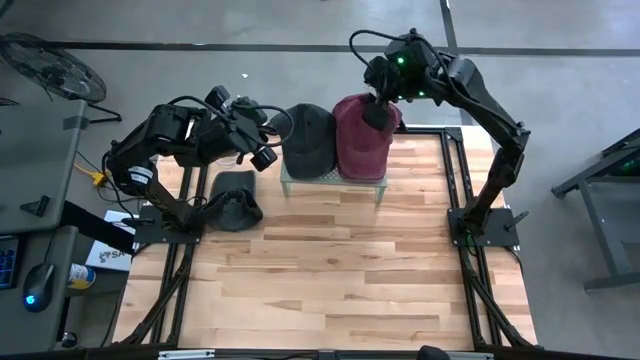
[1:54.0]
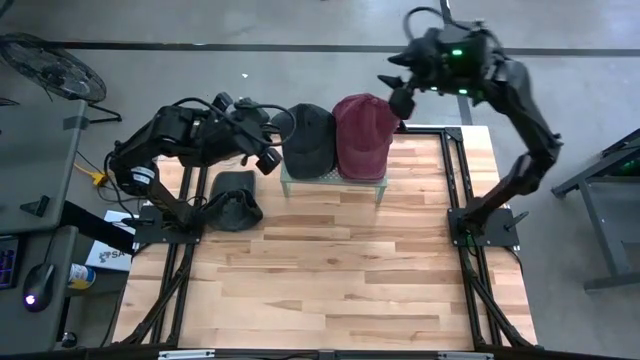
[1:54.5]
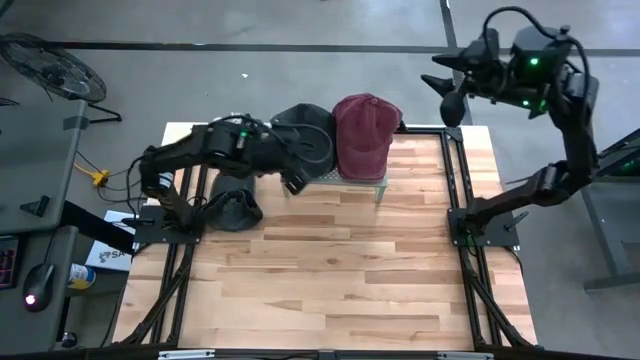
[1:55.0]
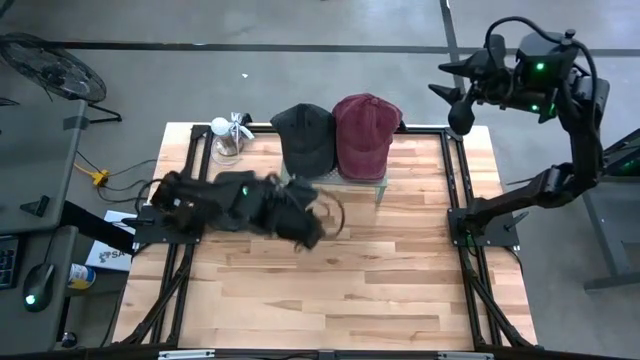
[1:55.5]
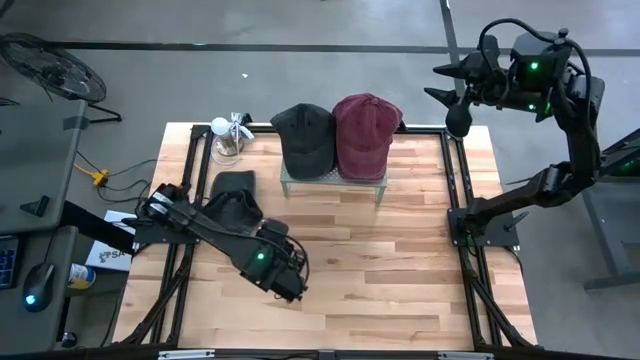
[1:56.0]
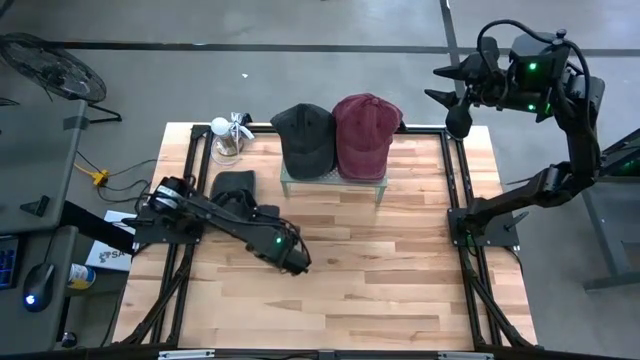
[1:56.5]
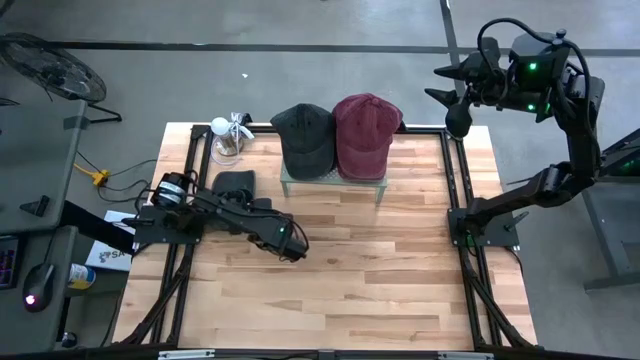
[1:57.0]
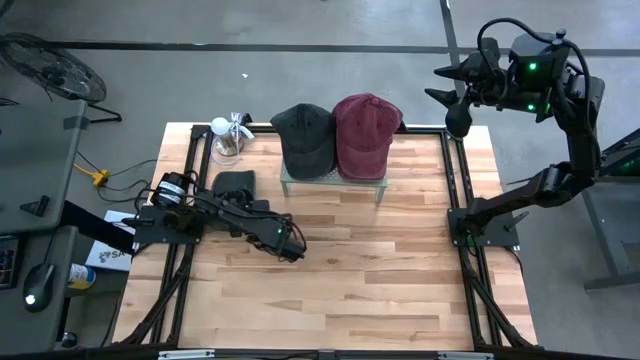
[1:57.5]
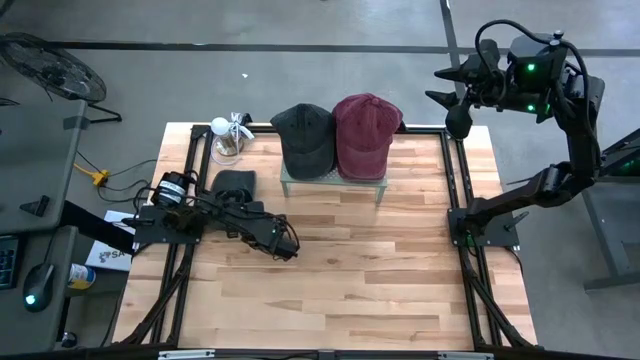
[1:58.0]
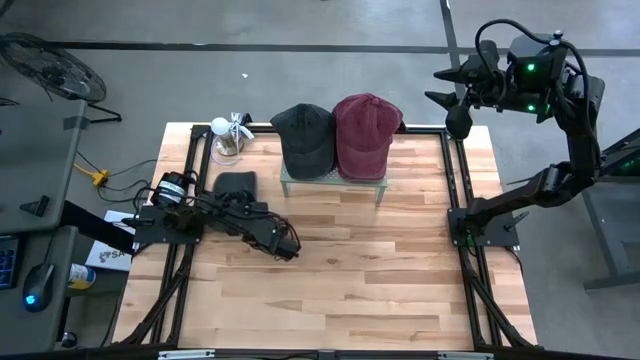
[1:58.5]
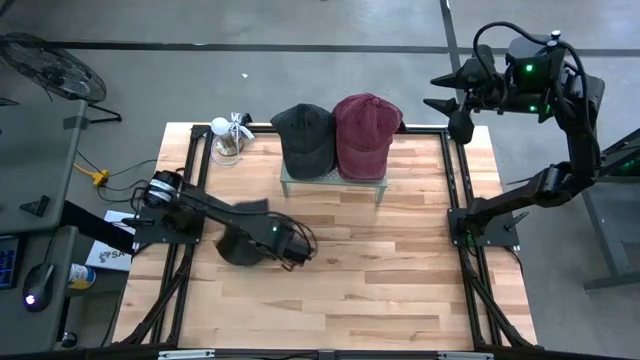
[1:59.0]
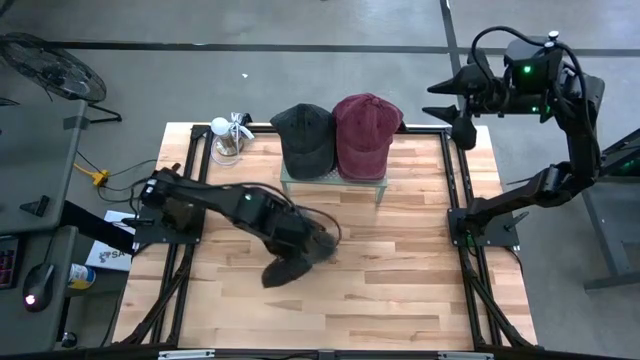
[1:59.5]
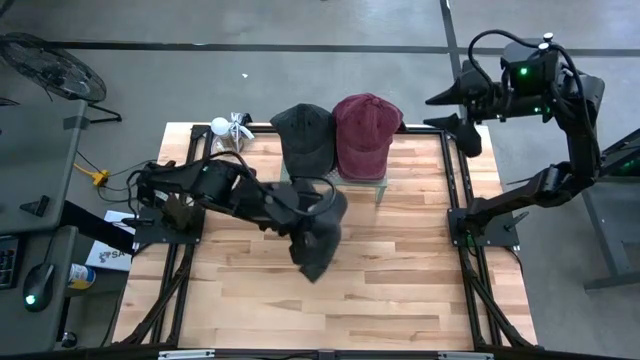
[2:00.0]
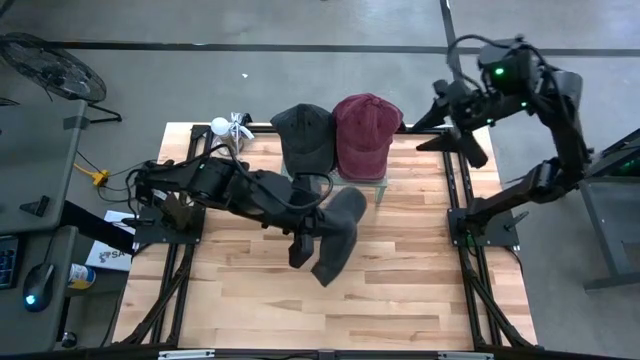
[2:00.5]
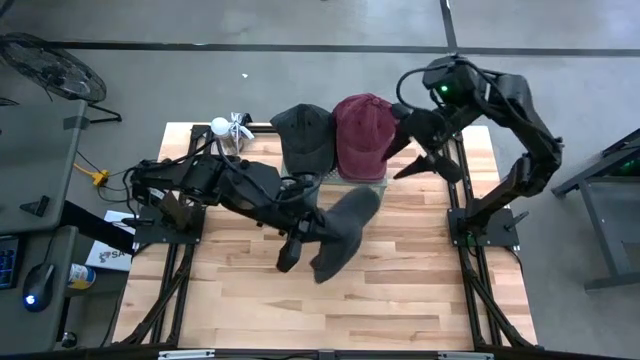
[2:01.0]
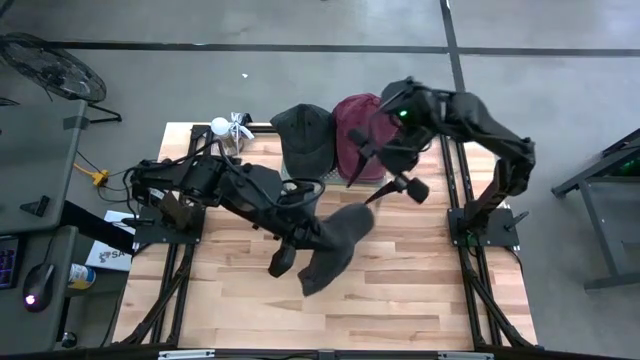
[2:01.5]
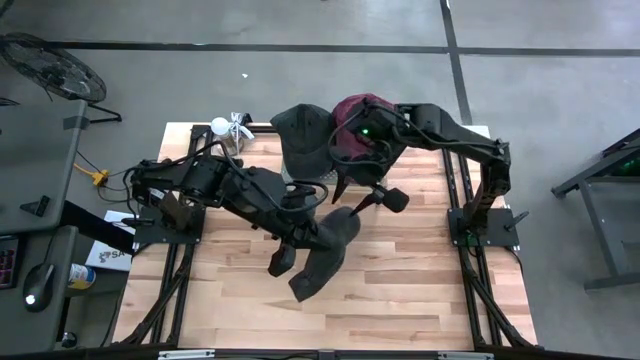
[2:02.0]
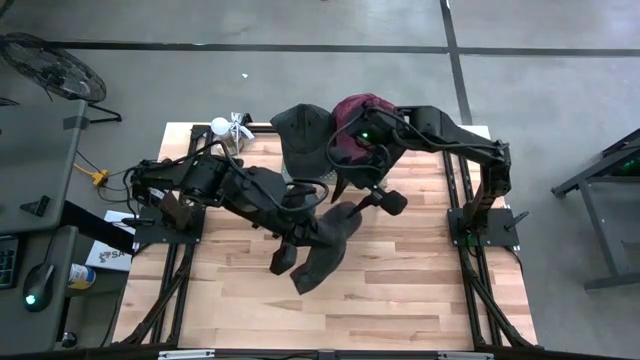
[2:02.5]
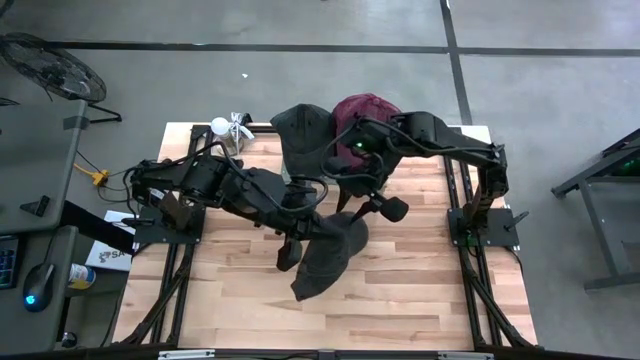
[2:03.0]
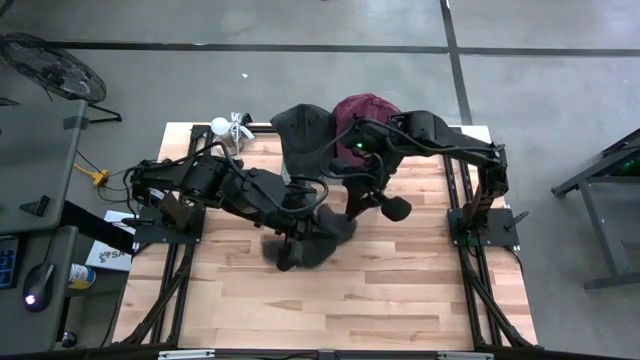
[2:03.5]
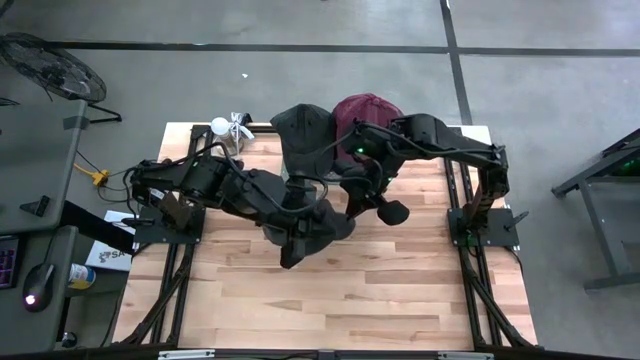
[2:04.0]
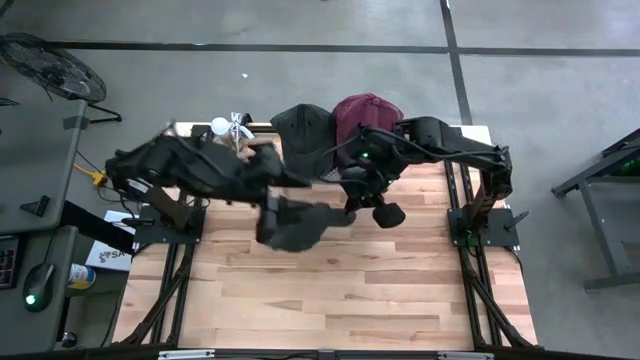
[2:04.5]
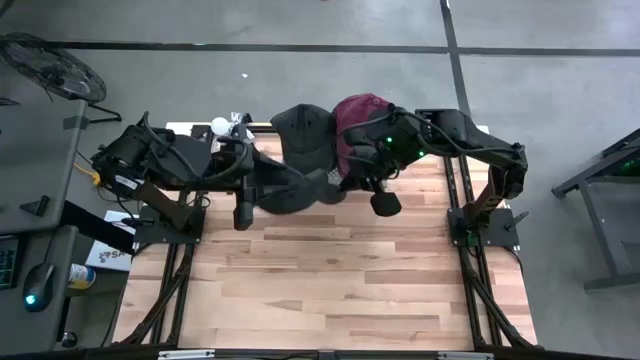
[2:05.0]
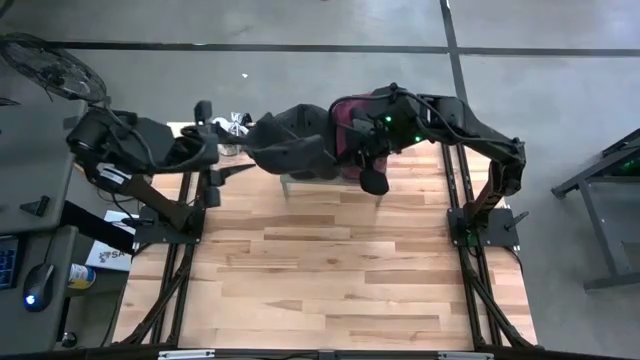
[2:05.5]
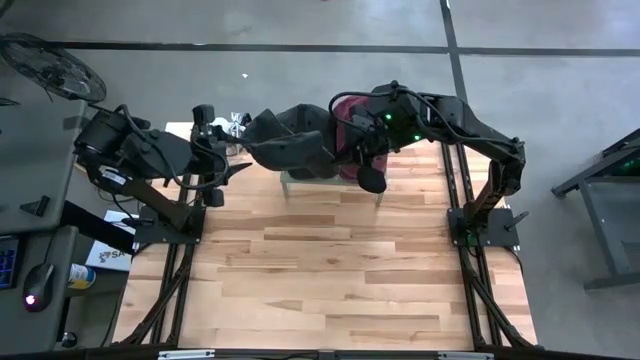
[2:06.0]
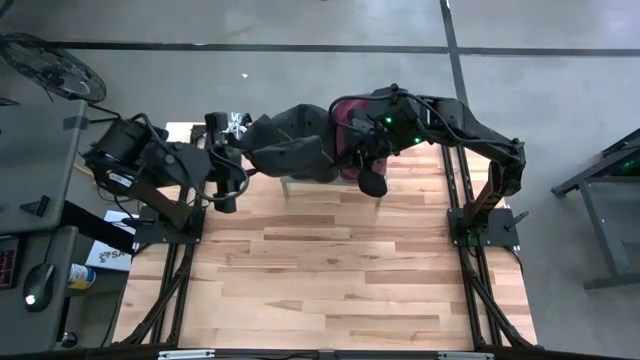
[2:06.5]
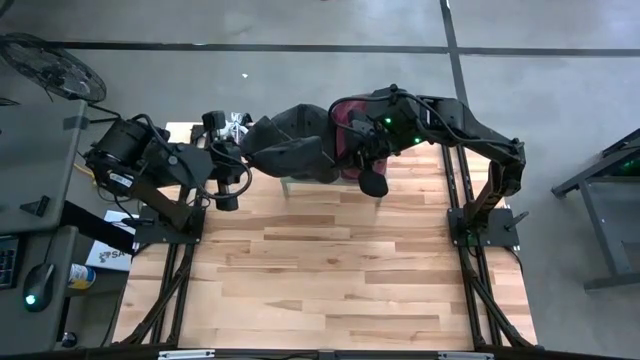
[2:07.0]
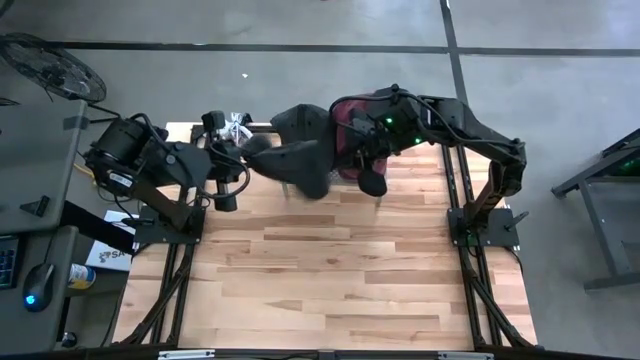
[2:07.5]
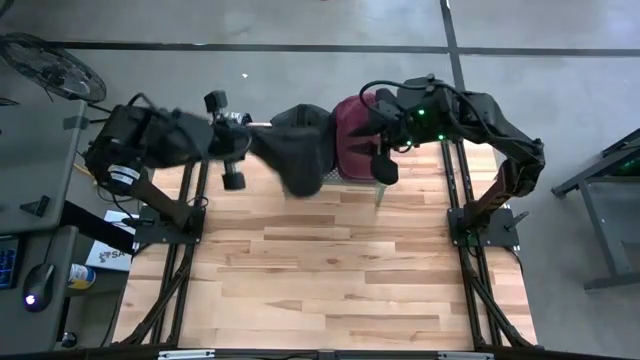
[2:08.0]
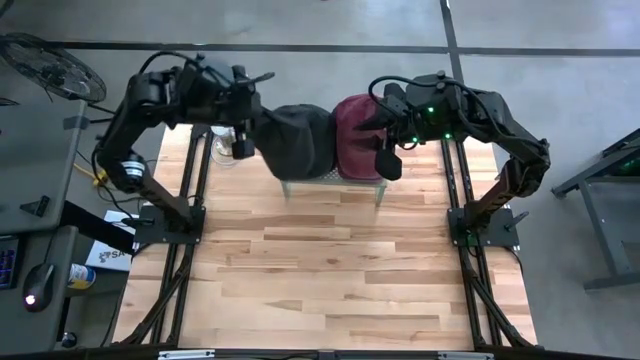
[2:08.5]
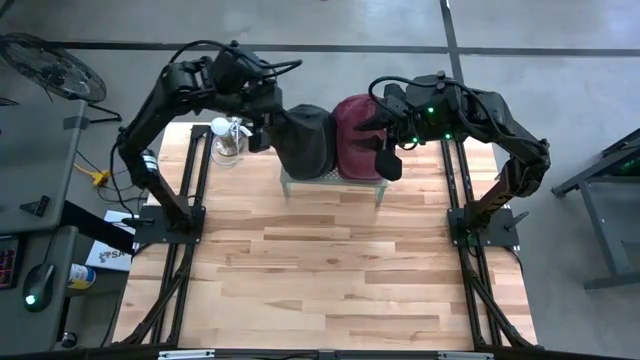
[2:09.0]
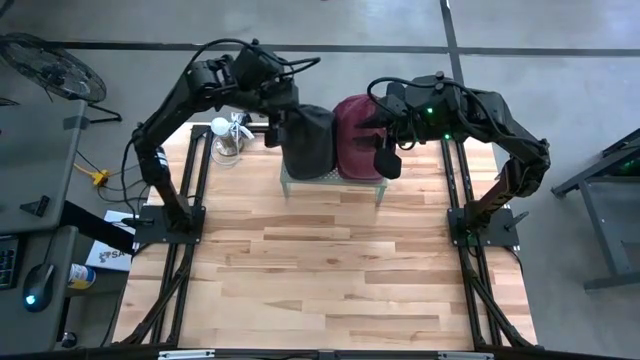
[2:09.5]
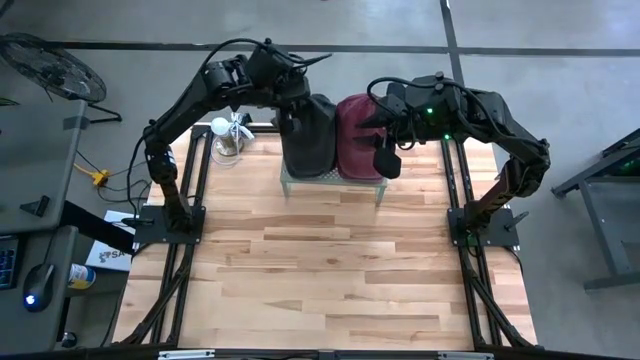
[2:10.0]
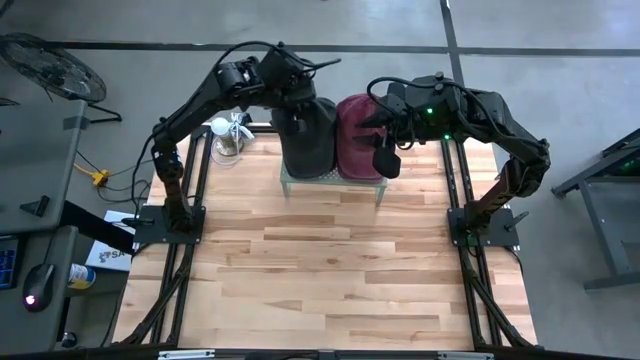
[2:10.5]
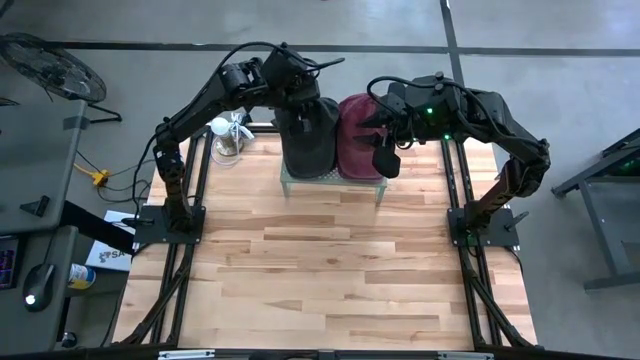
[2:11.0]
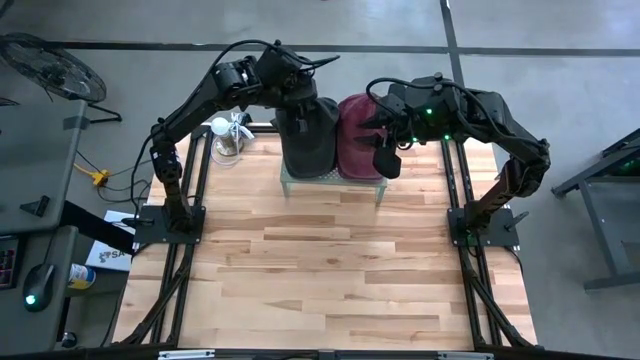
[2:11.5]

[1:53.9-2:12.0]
Task: Pick & Place hat
Stack the black cap on the other black caps on the shelf

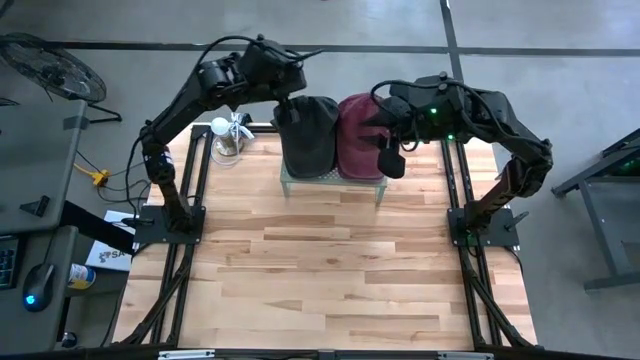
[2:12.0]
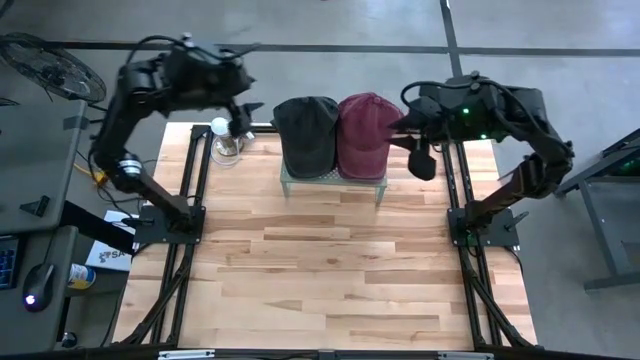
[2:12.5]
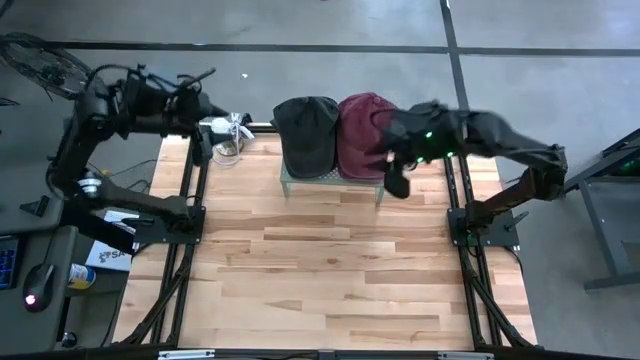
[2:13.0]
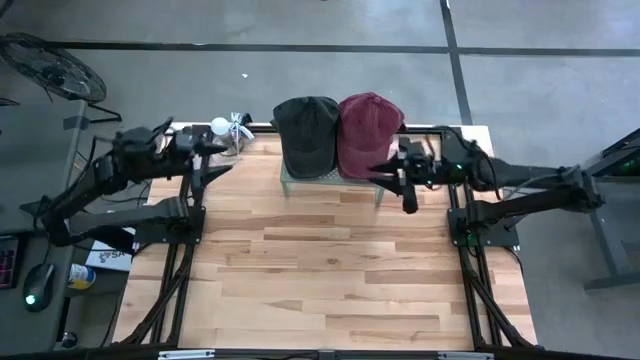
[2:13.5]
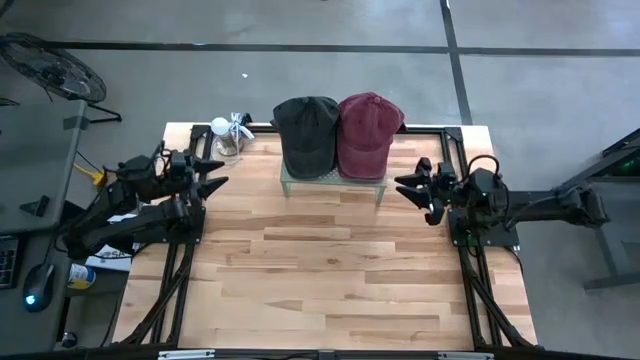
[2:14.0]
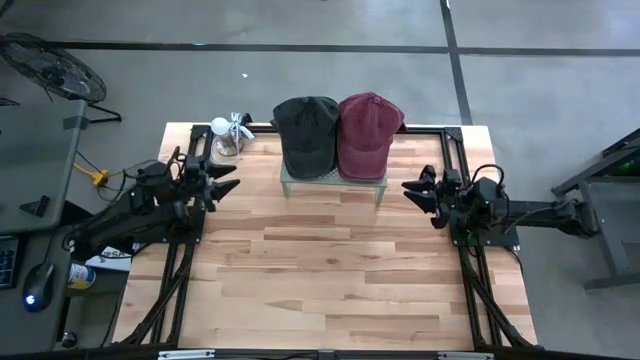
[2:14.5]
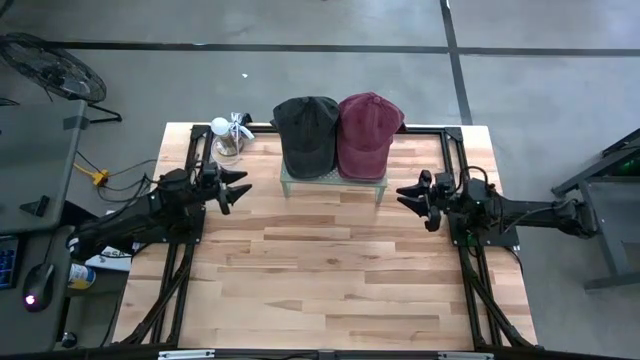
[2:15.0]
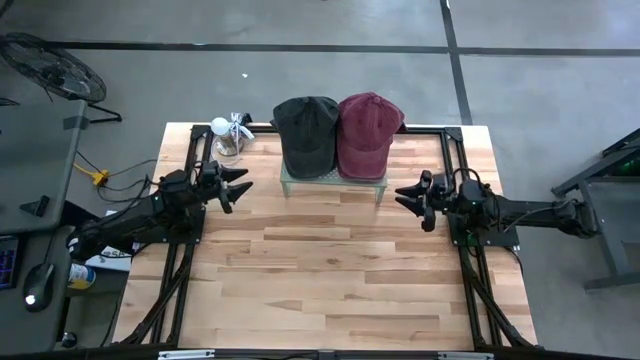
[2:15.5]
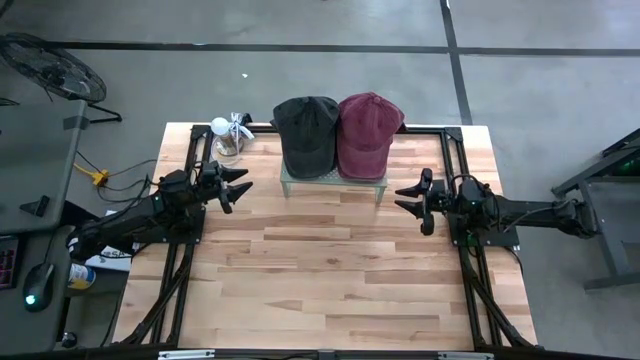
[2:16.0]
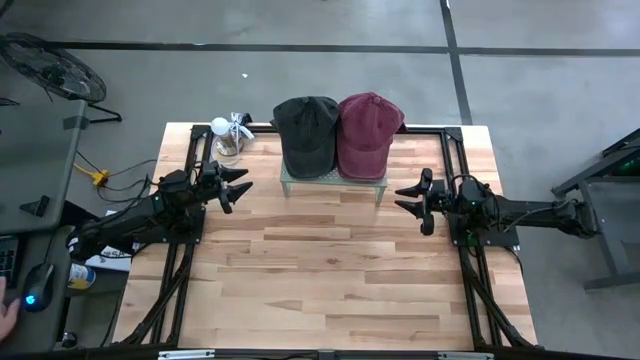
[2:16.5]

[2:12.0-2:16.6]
Return to Home Position
